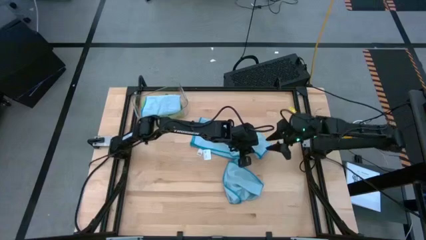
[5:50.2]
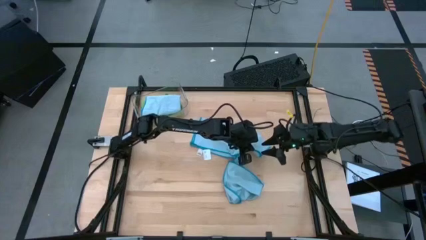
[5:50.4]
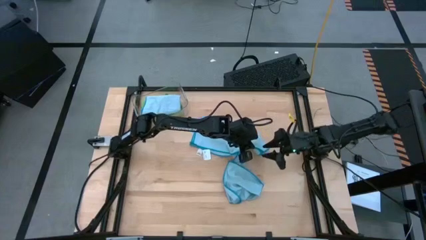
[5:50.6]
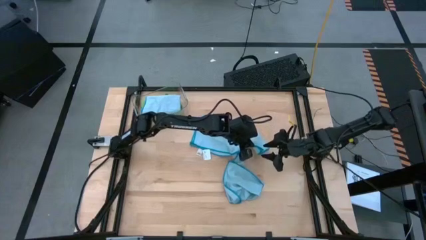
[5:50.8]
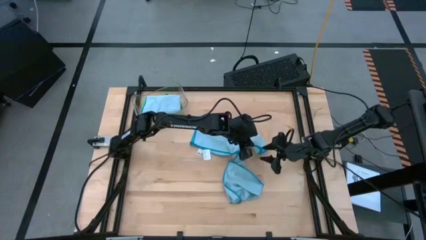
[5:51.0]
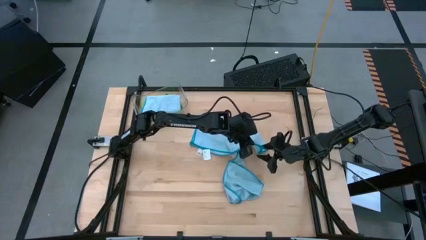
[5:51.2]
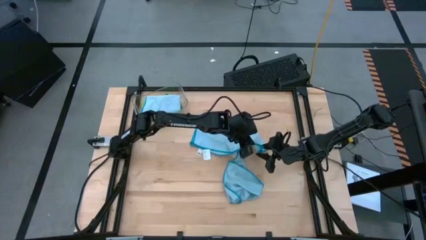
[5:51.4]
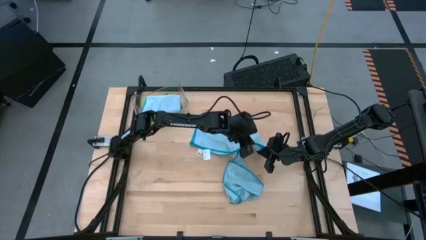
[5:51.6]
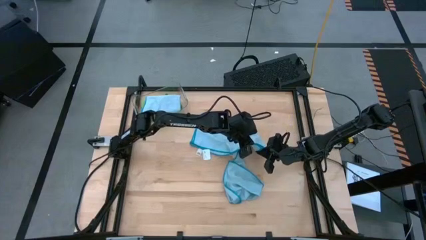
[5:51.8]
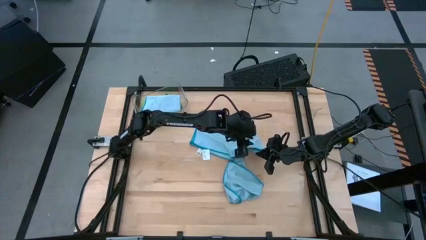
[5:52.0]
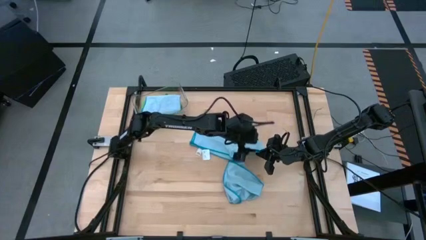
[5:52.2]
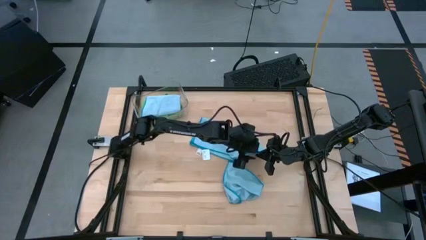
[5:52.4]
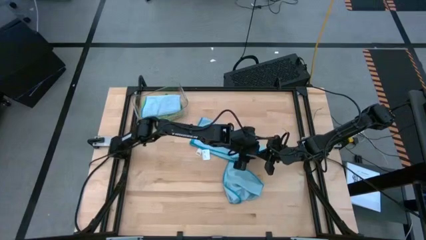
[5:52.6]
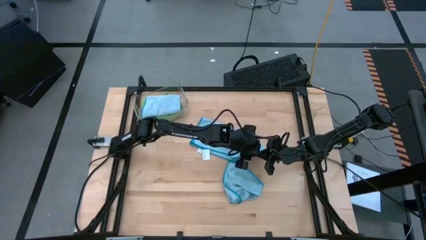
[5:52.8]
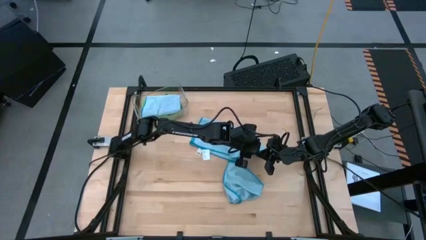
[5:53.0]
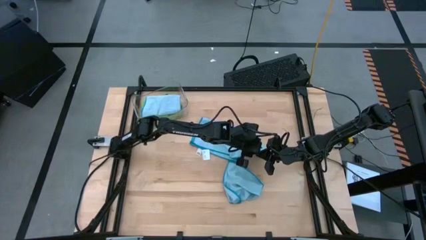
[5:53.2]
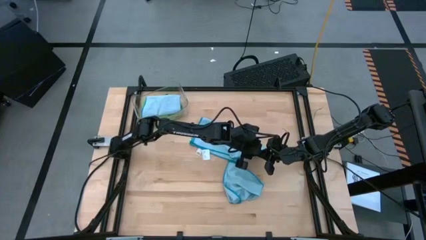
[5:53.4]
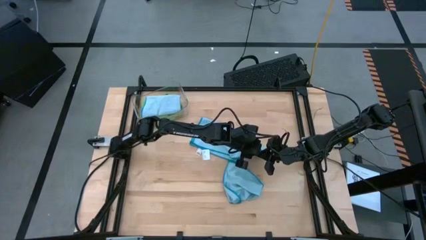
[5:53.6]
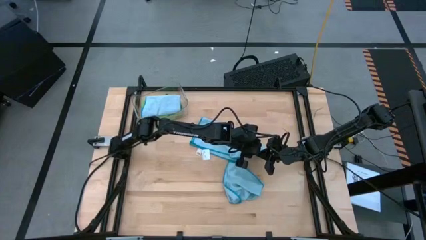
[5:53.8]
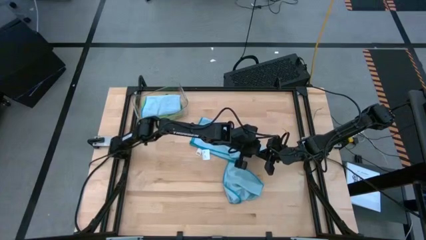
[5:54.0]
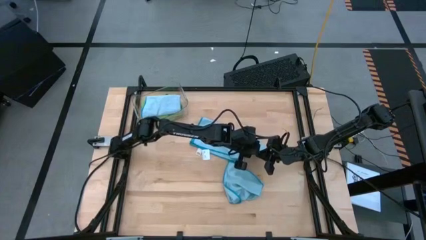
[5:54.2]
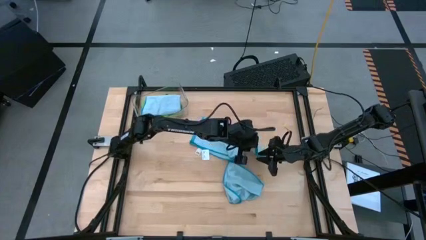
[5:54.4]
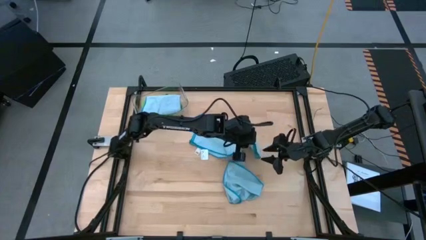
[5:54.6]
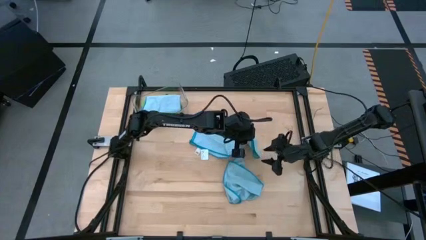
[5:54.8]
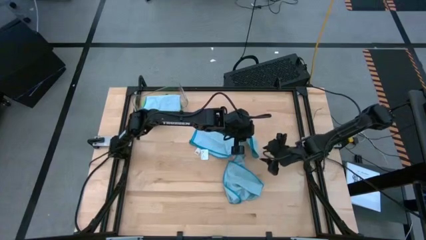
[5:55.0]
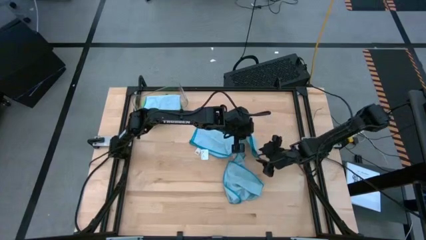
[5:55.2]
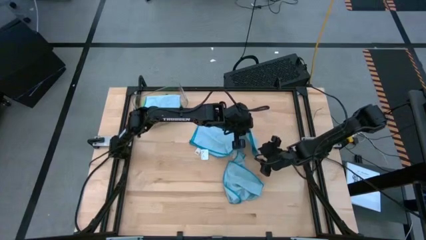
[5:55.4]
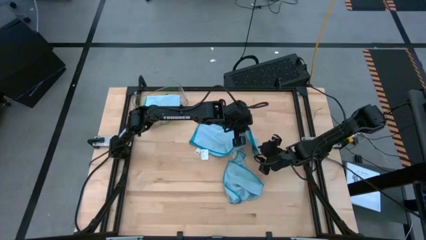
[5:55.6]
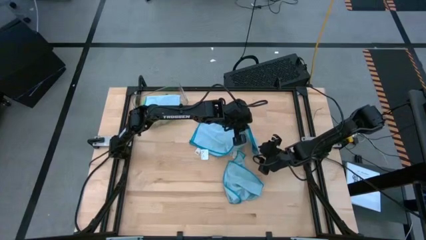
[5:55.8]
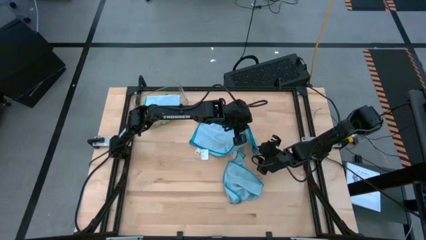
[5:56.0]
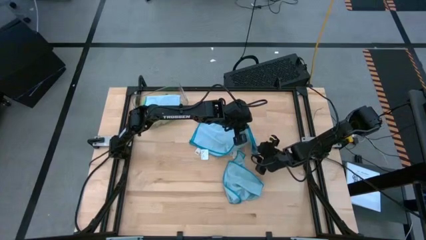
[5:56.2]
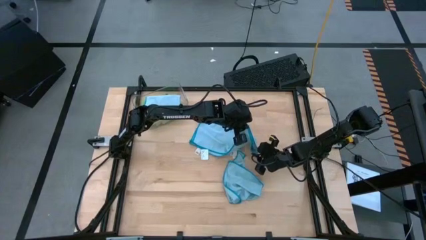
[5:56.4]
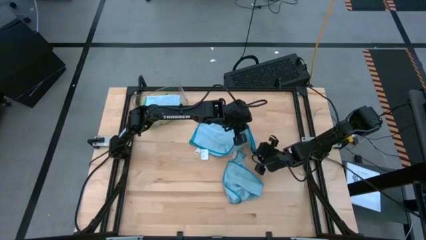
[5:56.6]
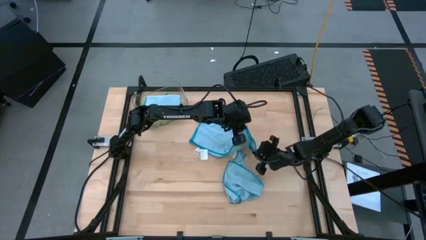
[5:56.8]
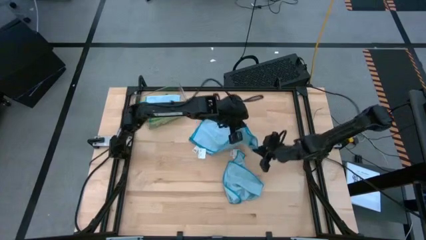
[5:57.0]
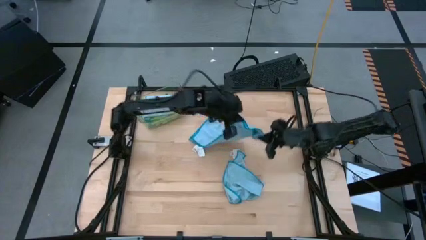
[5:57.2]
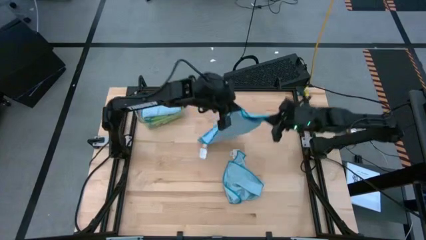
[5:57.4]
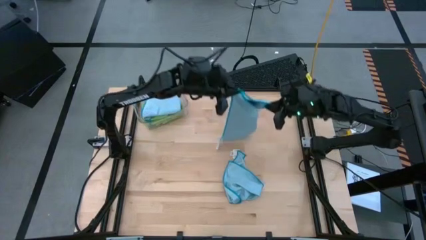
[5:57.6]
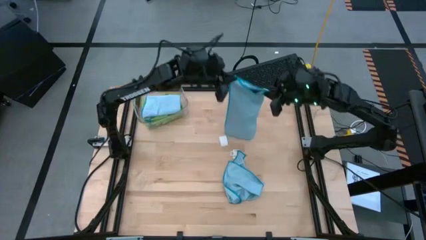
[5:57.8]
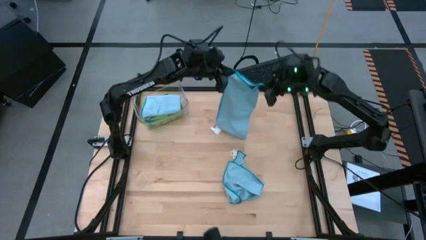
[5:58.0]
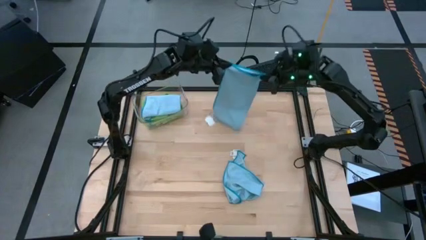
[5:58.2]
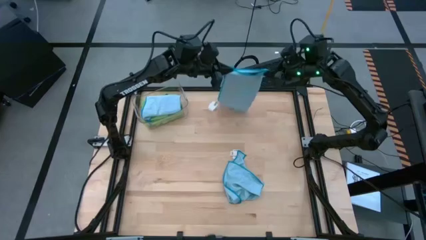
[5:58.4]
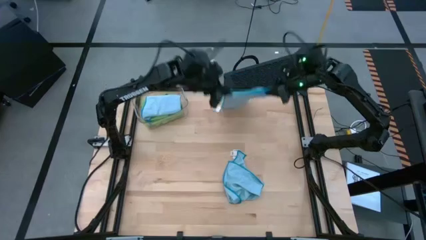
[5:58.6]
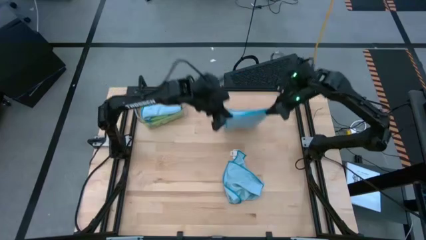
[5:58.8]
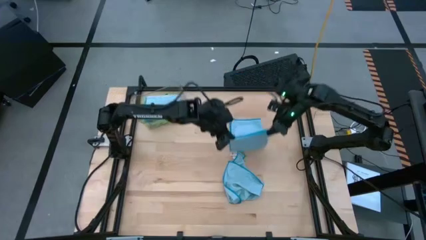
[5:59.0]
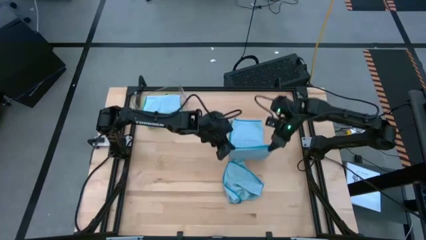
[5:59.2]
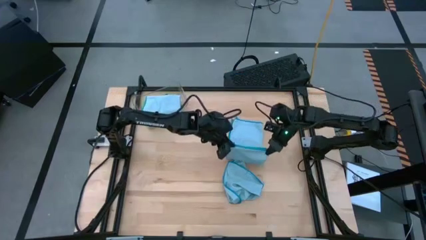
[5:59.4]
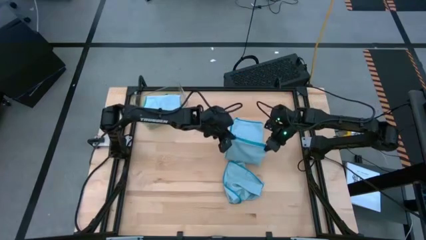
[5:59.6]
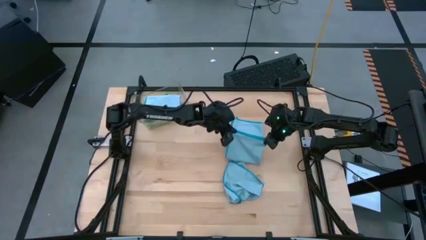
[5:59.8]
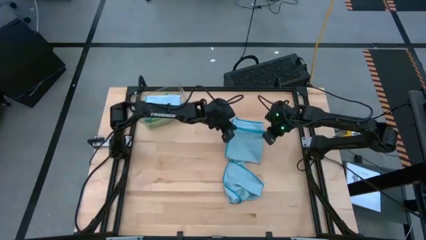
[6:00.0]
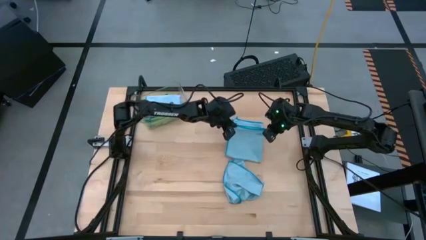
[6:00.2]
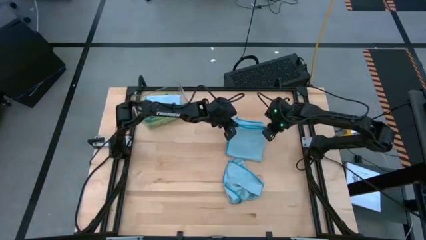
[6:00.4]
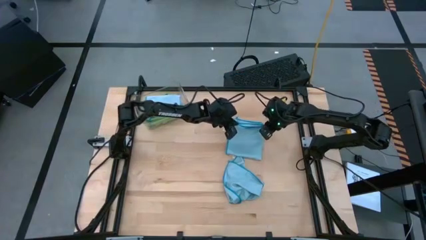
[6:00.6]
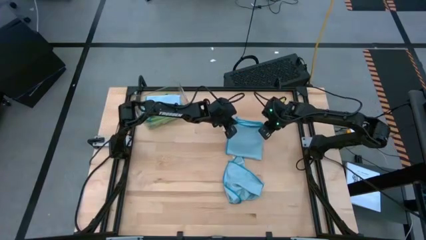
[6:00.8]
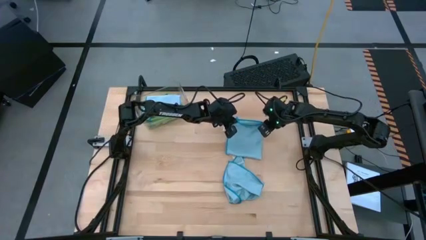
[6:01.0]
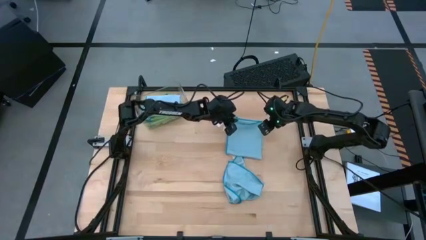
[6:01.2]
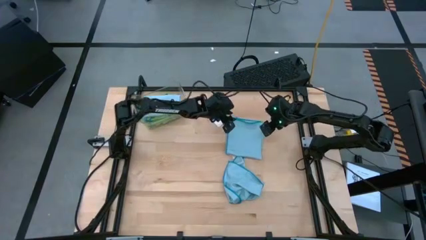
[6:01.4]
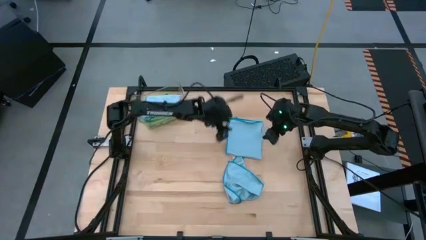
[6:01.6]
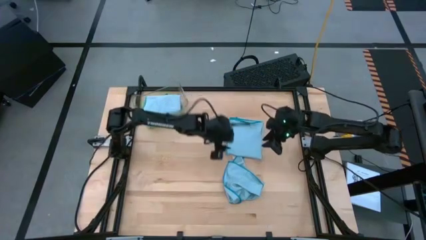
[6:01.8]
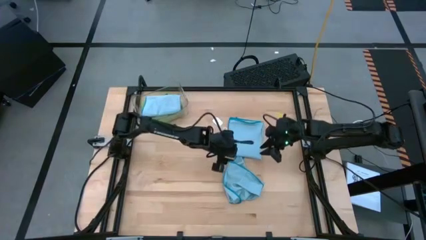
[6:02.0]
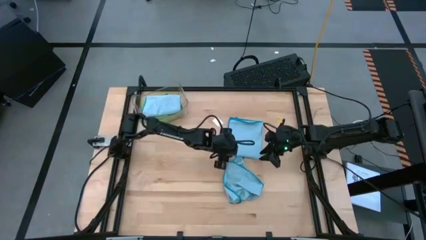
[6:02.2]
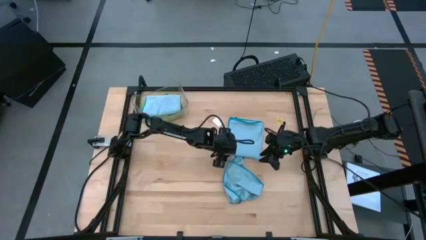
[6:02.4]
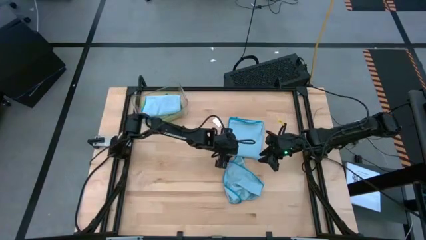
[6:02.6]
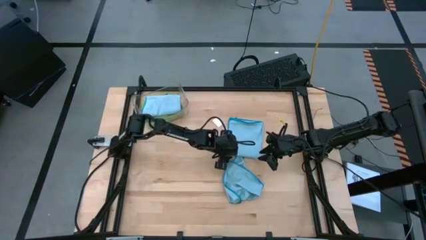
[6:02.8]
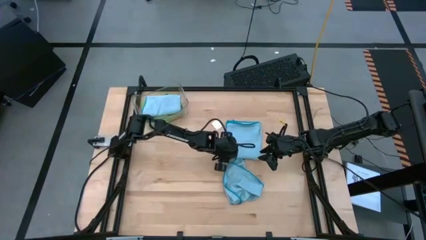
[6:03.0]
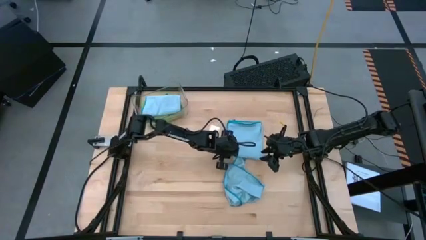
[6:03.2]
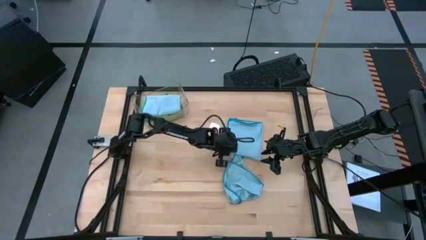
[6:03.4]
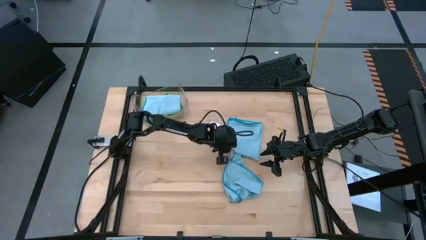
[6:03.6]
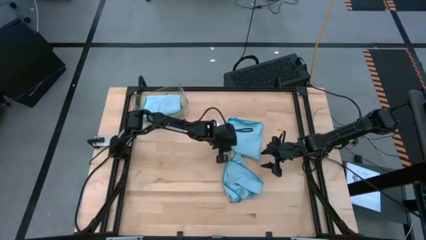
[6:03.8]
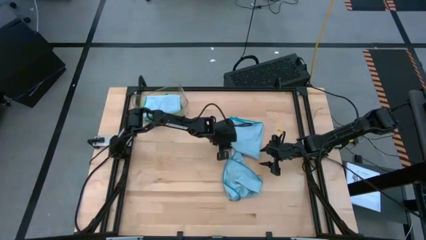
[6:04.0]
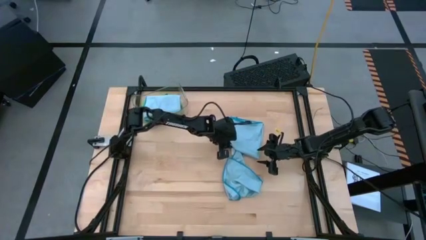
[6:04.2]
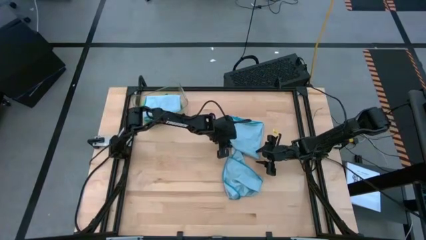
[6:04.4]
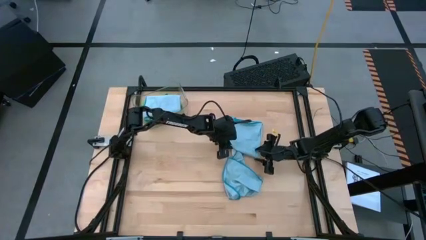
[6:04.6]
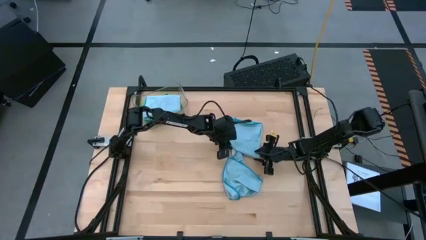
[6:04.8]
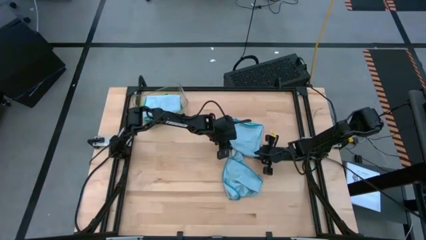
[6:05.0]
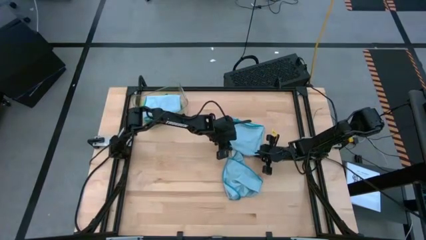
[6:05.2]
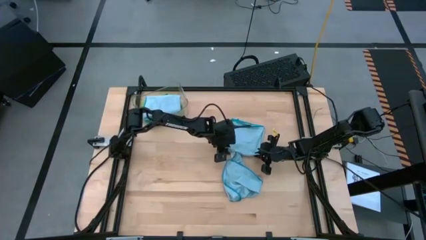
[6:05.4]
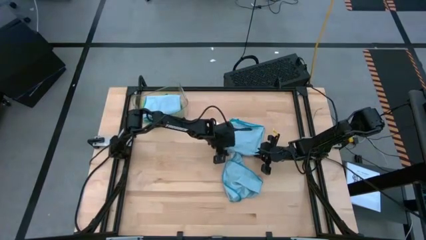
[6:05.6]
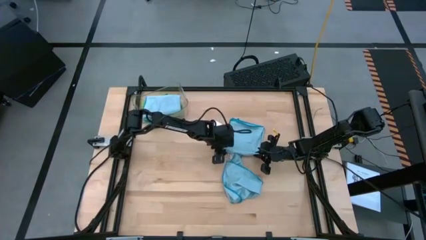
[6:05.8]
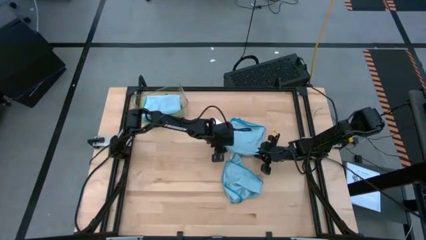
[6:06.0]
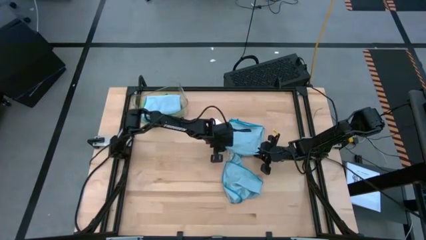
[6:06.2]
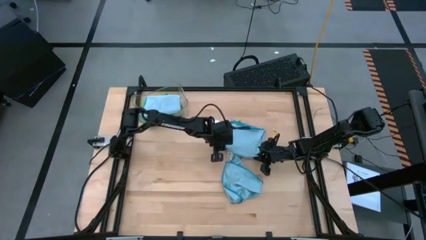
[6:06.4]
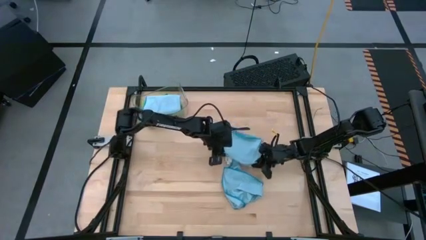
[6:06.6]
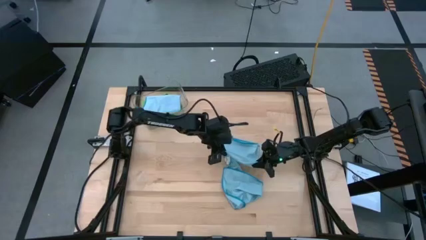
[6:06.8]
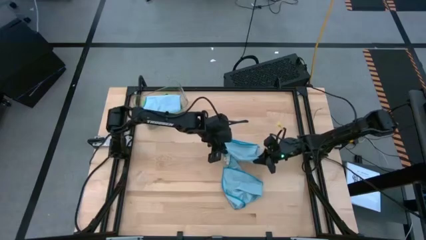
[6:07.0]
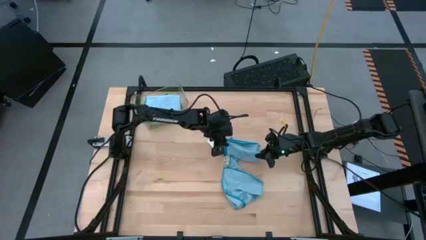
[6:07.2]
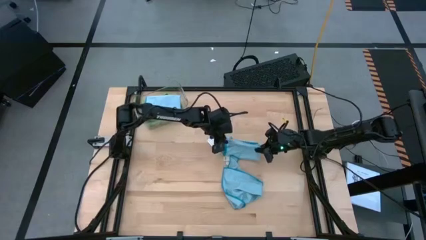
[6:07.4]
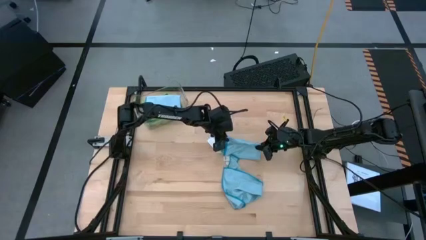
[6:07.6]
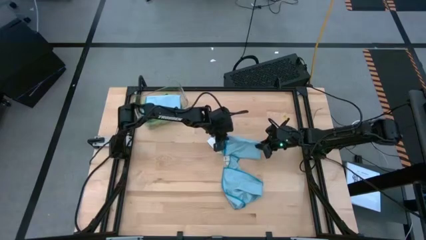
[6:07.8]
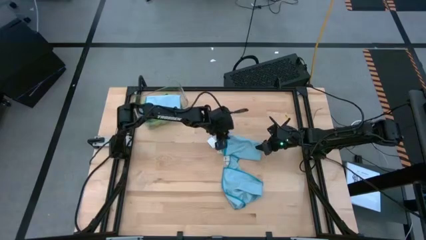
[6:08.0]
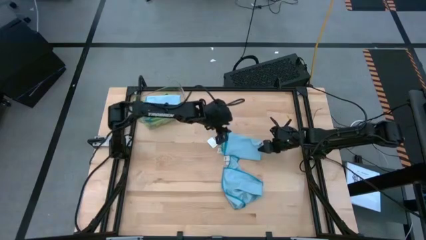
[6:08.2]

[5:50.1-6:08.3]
Task: Fold microfiber towels
Fold the left blue microfiber cloth
